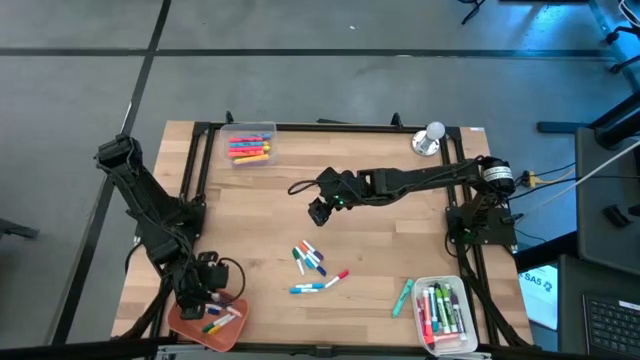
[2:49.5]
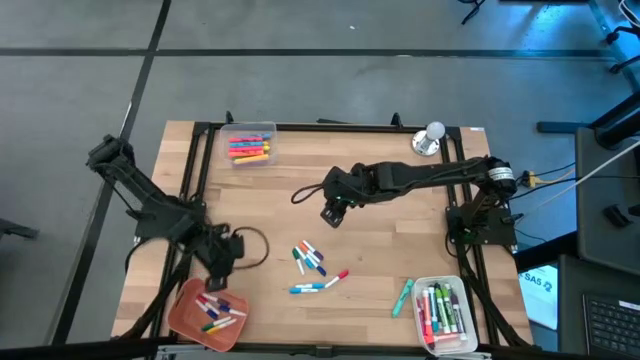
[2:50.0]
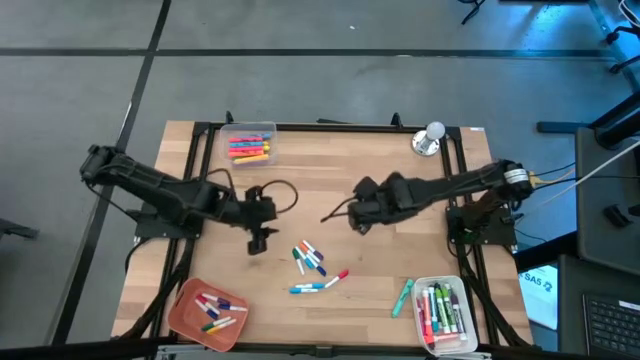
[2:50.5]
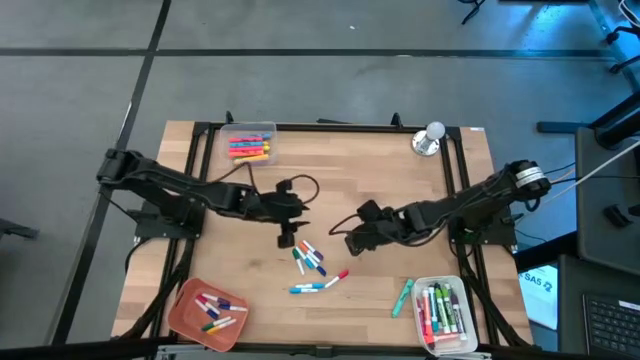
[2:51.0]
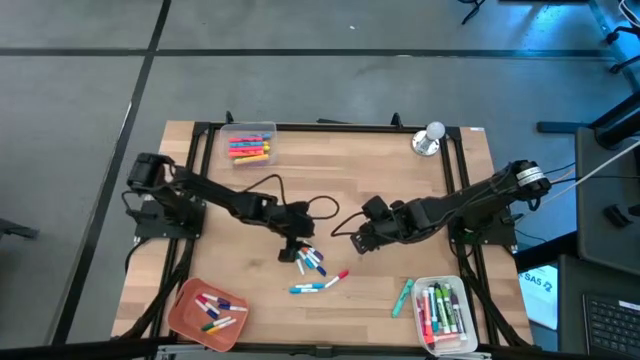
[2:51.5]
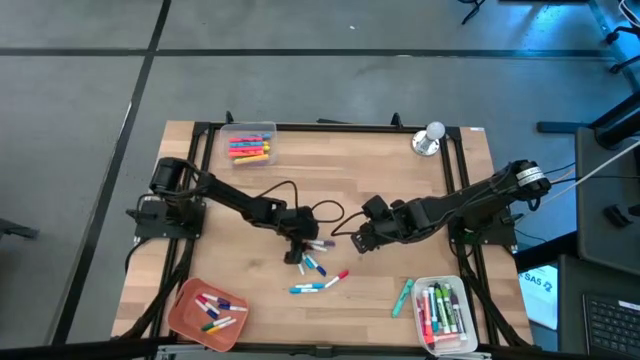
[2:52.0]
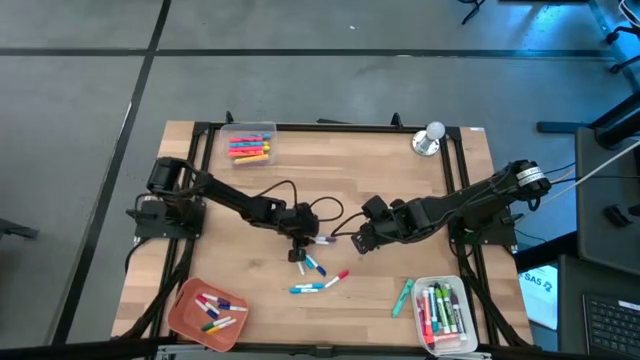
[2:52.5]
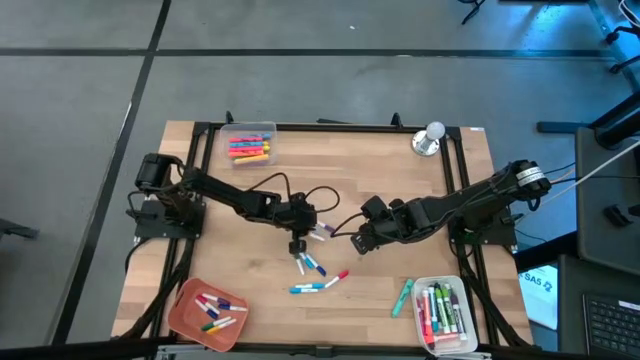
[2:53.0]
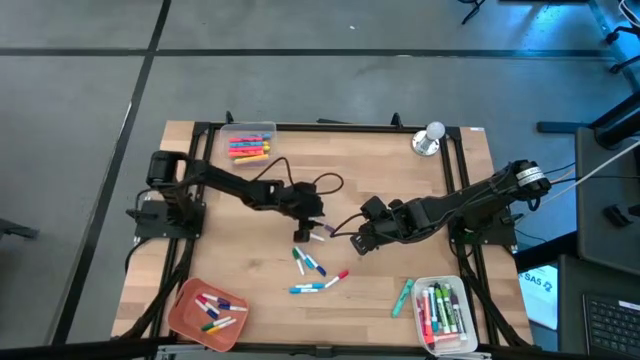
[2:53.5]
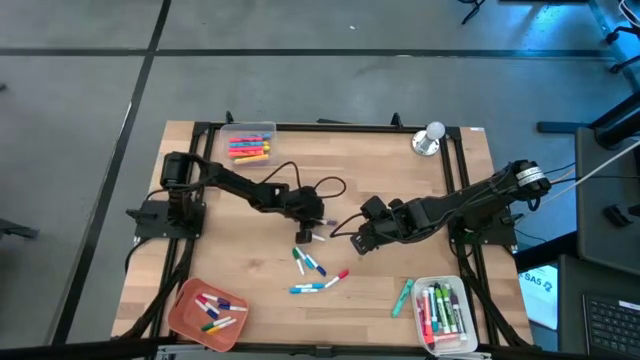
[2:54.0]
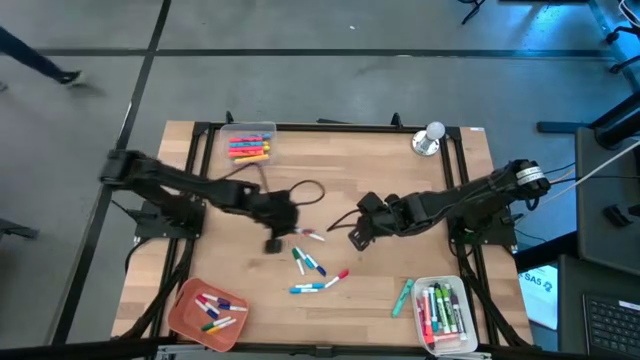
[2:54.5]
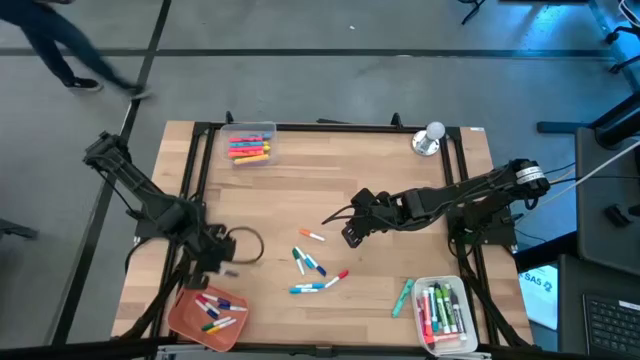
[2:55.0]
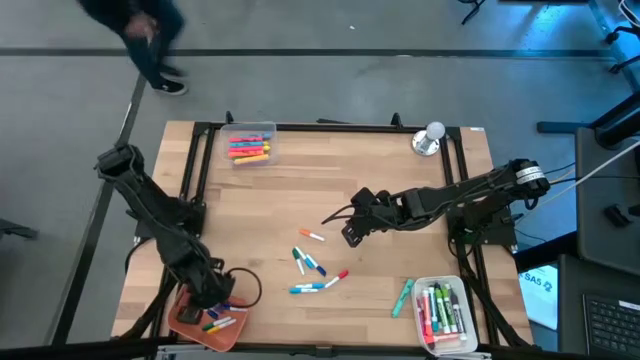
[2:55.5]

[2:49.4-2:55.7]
Task: Pick & Place Markers
Put the blue pen into the orange bin

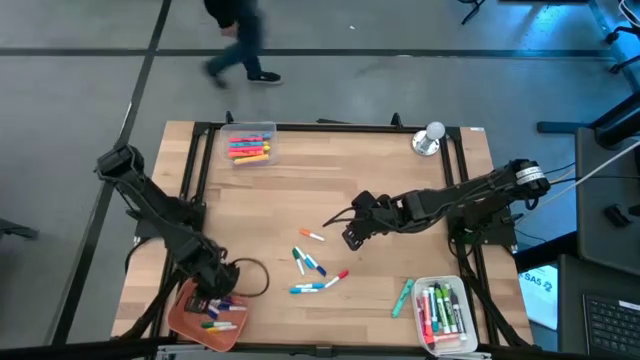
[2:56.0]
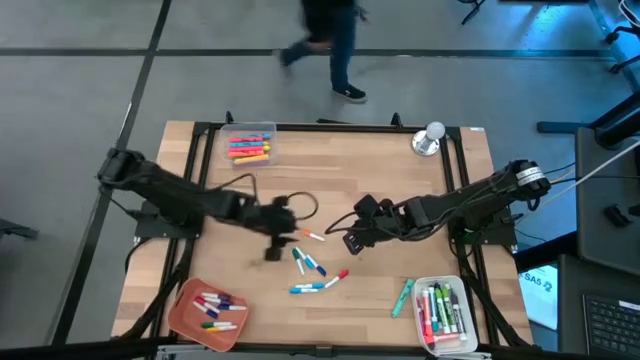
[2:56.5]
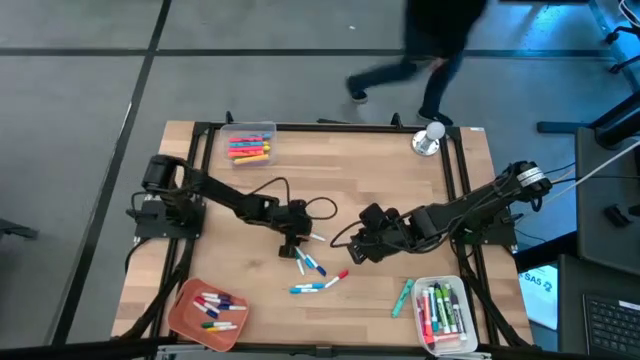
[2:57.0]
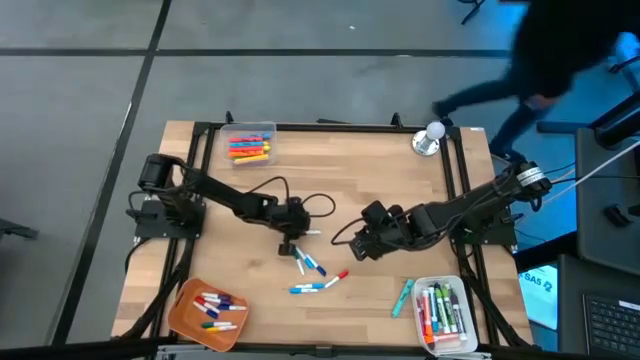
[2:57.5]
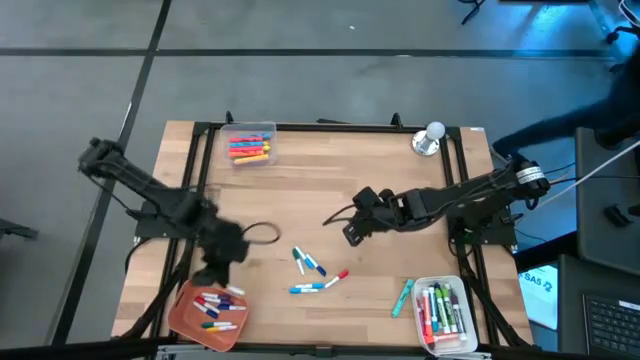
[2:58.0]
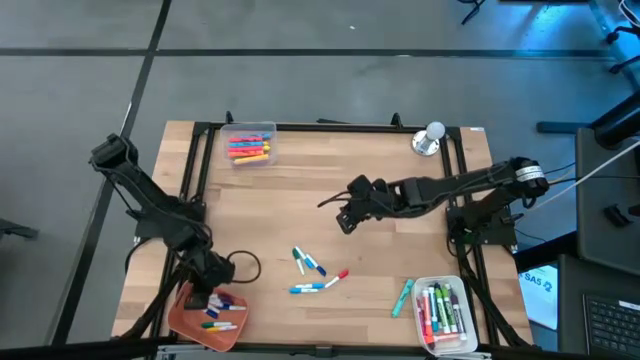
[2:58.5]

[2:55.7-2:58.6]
Put the orange pen into the orange bin

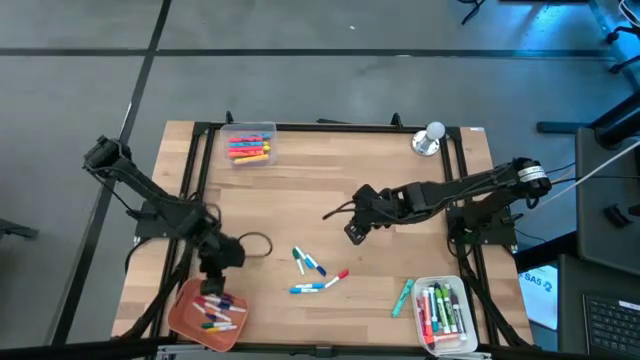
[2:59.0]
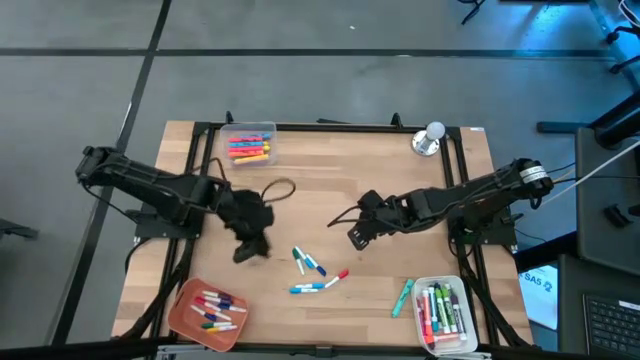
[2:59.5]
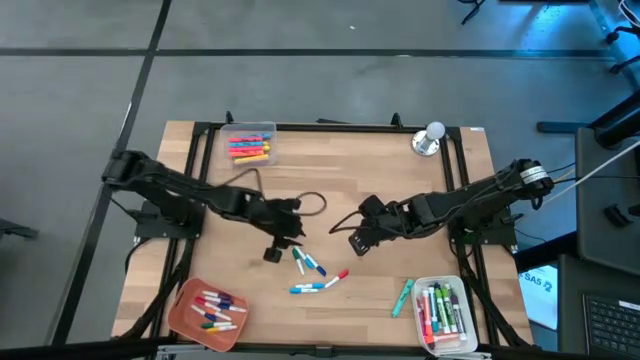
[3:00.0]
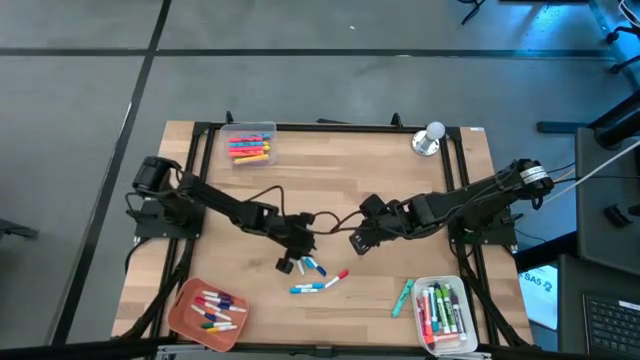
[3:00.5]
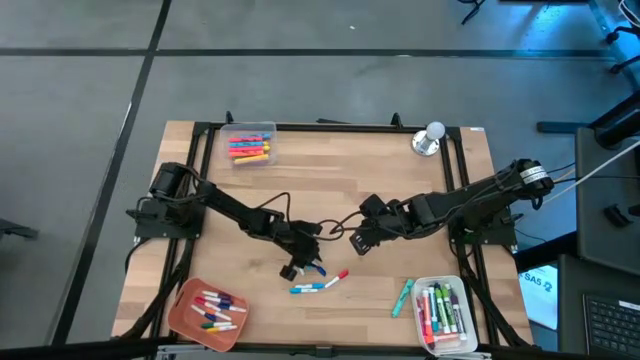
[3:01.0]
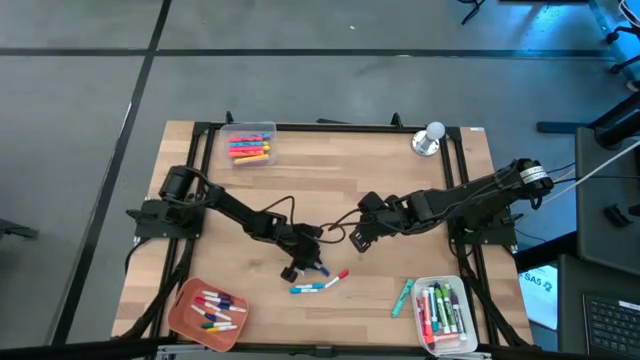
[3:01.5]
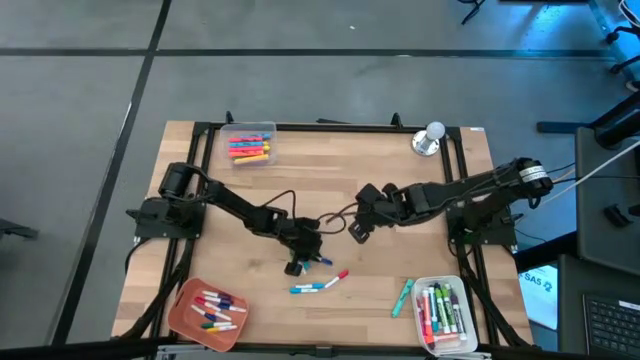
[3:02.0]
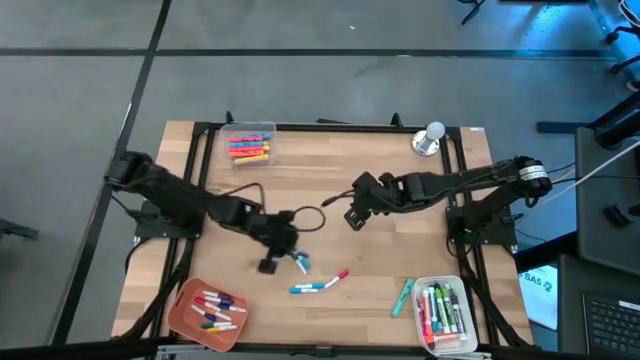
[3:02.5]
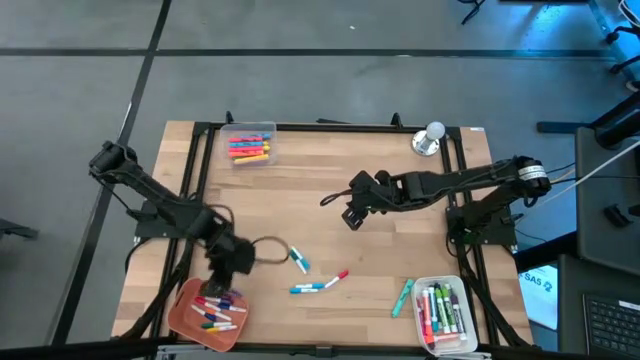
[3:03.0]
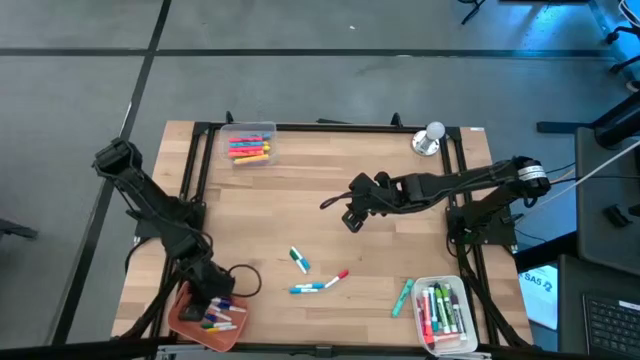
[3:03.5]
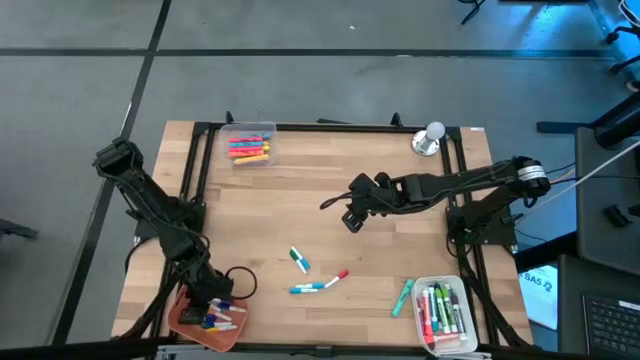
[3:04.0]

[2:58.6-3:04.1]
Put the blue pen into the orange bin

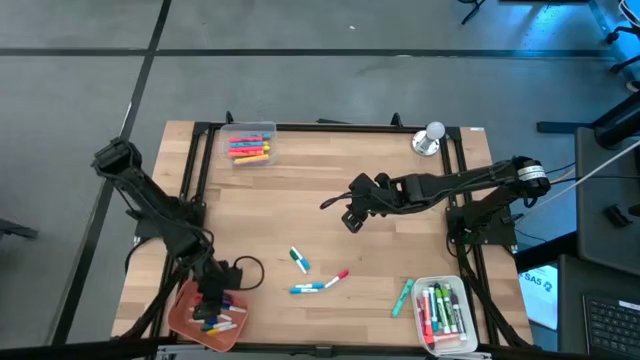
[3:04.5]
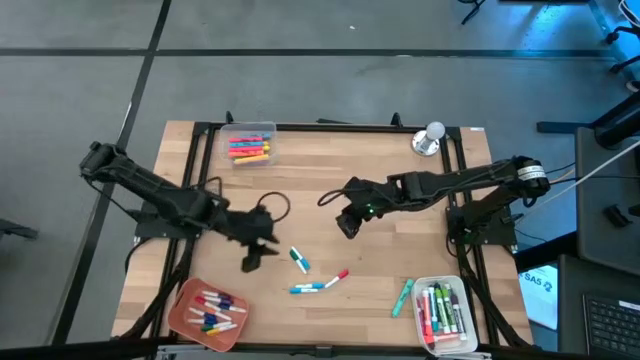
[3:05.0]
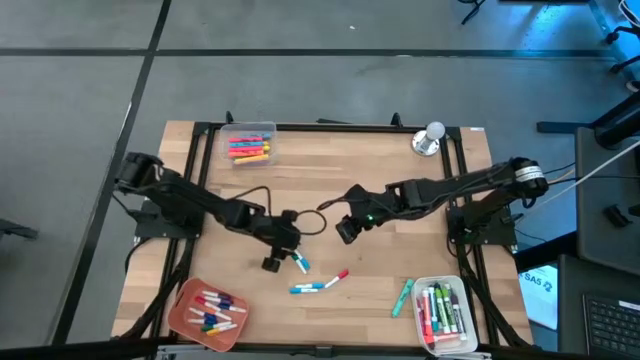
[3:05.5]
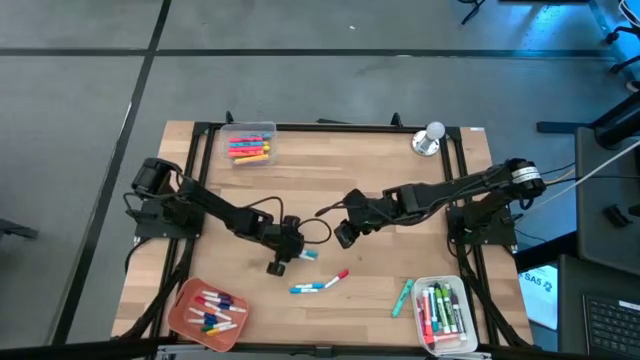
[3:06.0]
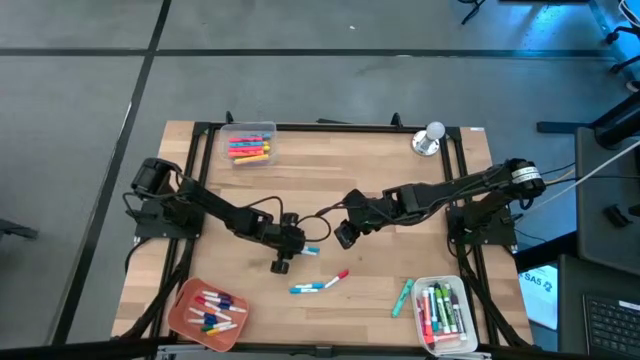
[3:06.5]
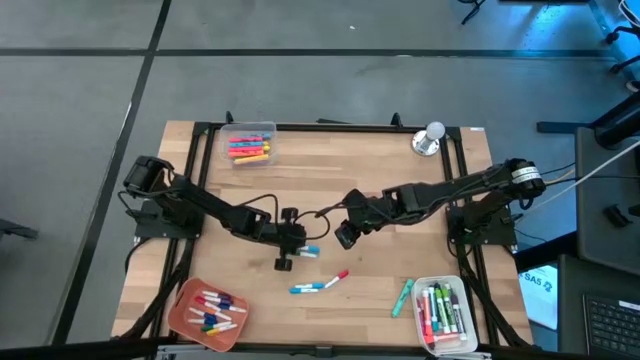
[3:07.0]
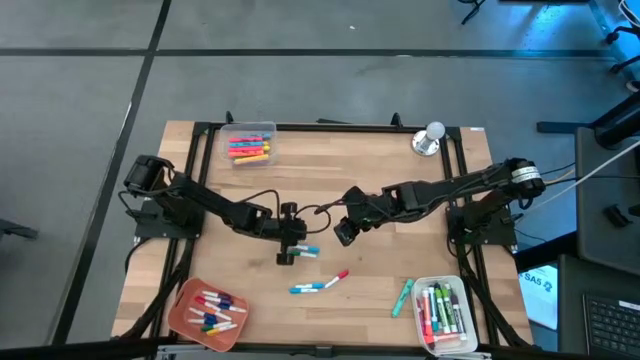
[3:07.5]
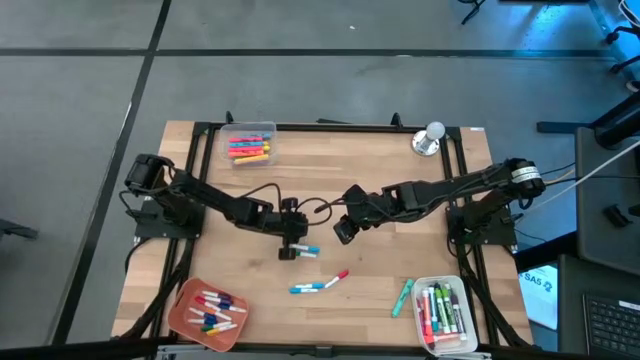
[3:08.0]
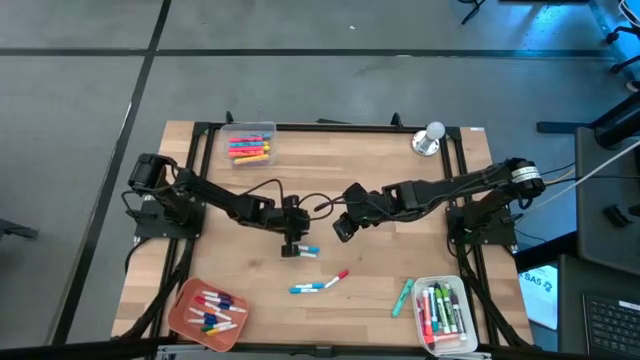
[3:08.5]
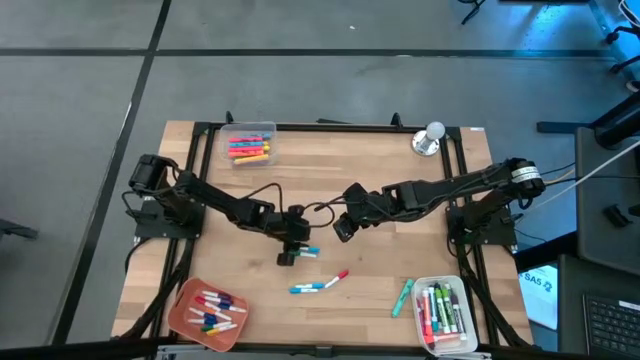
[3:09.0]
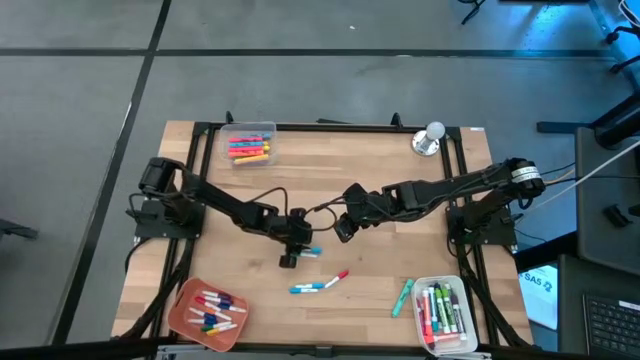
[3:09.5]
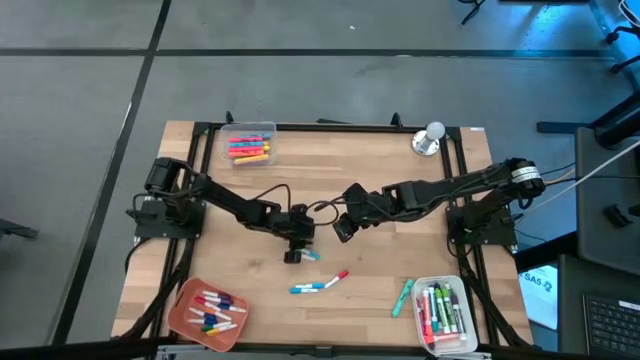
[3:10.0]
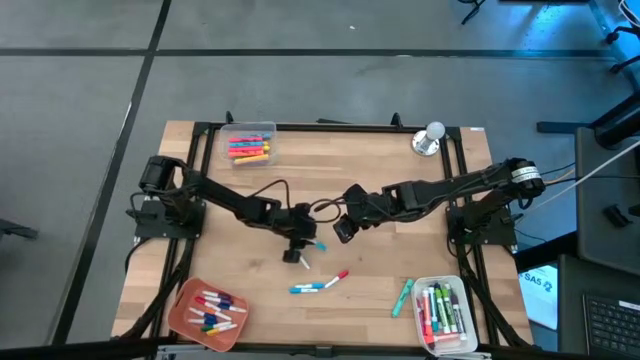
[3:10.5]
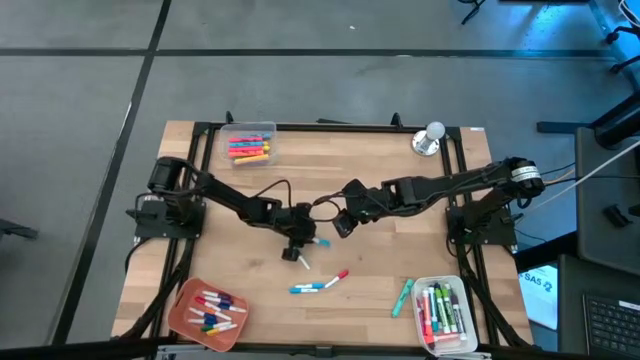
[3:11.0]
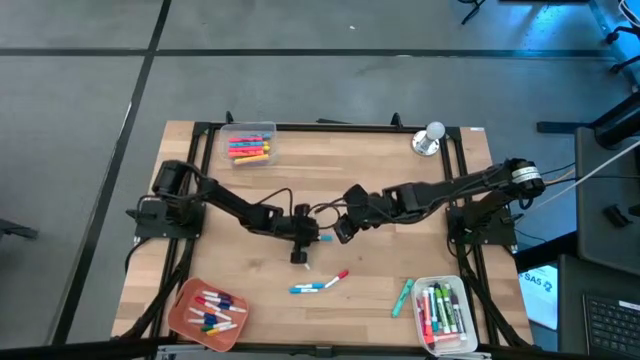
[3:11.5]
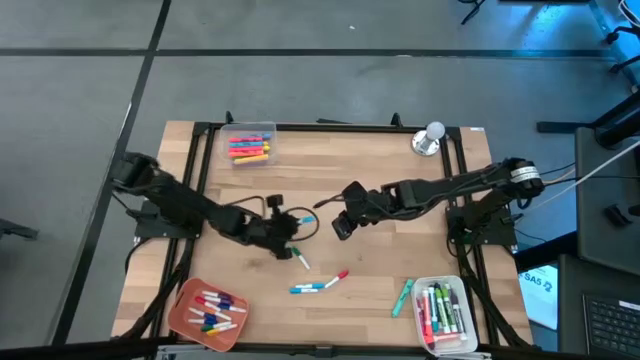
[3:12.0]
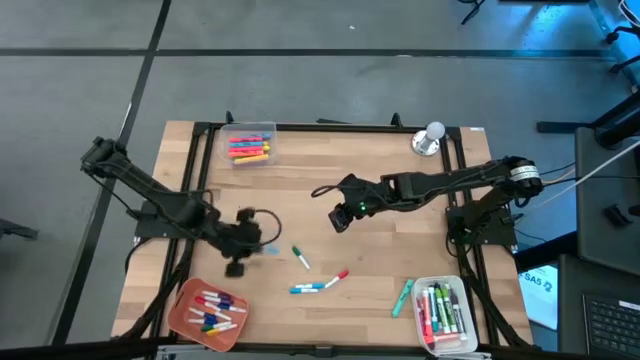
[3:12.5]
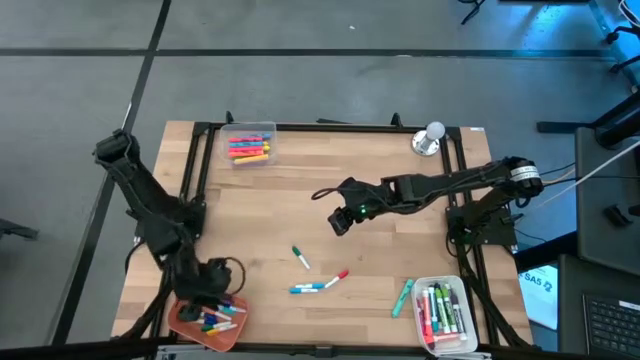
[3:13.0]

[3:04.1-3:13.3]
Put the bottom center pitch blue pen into the orange bin
